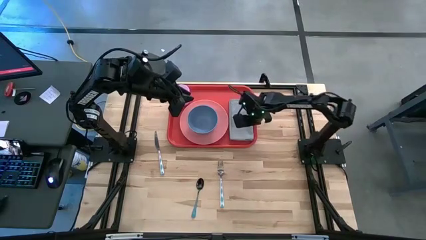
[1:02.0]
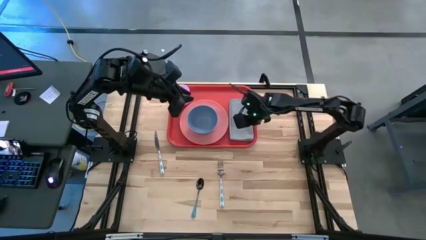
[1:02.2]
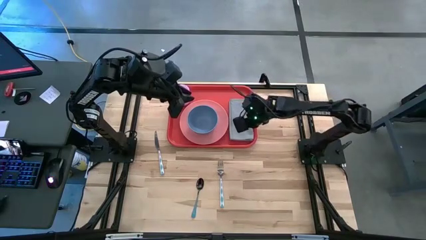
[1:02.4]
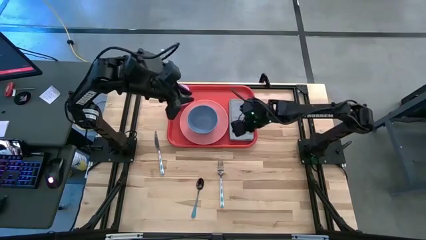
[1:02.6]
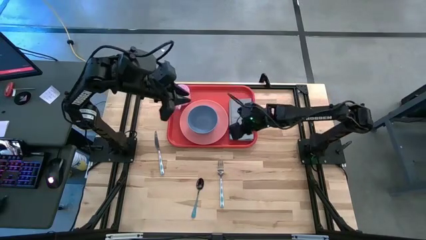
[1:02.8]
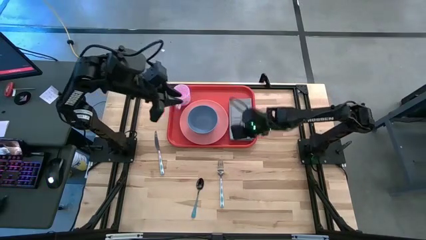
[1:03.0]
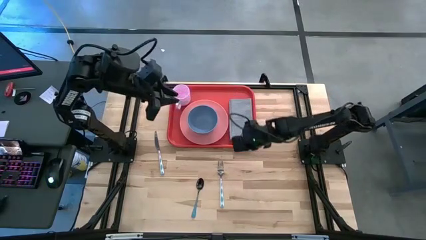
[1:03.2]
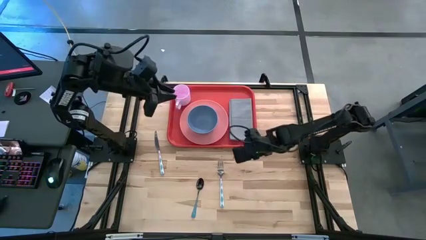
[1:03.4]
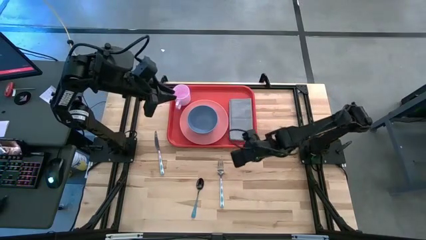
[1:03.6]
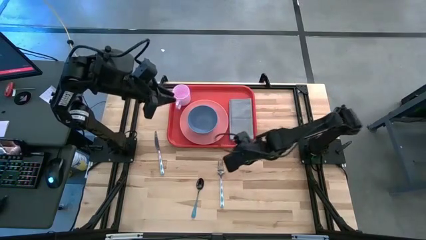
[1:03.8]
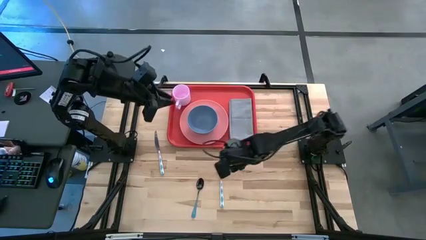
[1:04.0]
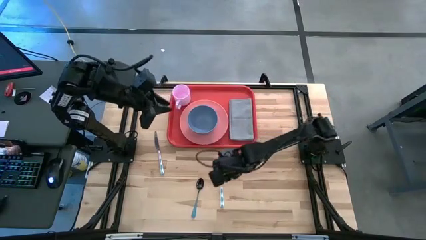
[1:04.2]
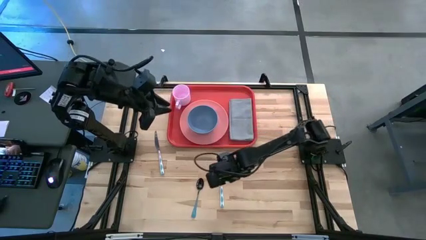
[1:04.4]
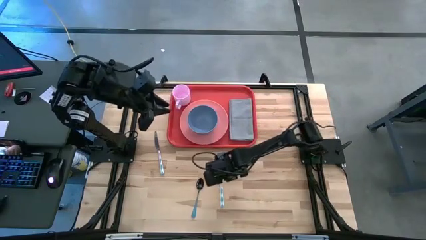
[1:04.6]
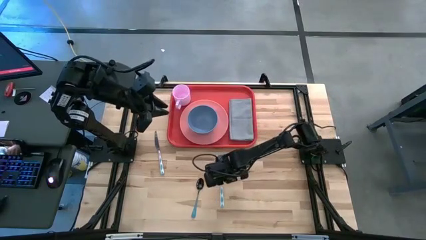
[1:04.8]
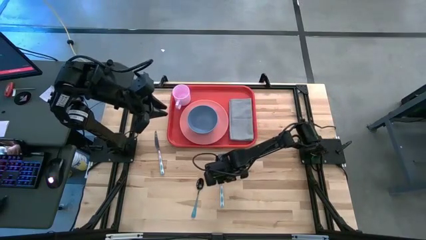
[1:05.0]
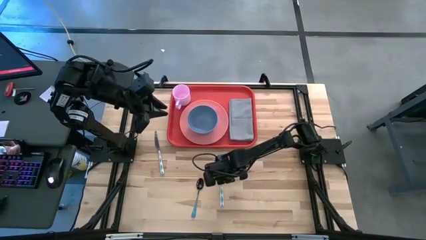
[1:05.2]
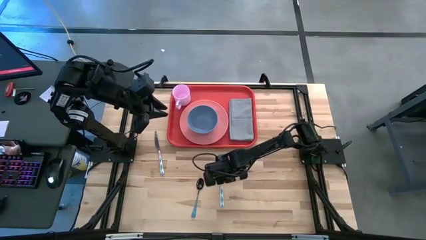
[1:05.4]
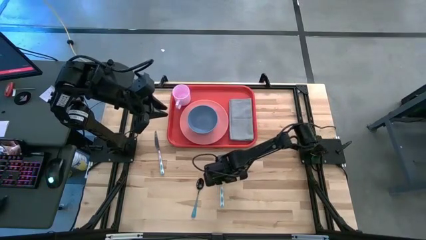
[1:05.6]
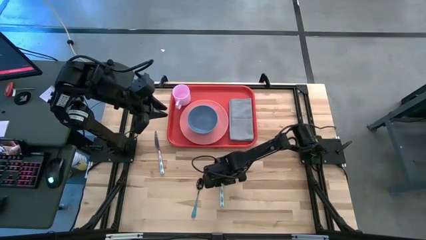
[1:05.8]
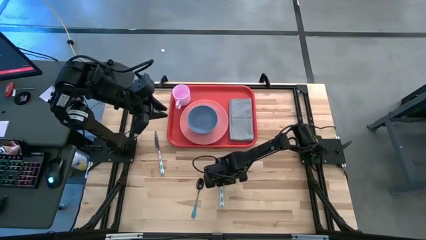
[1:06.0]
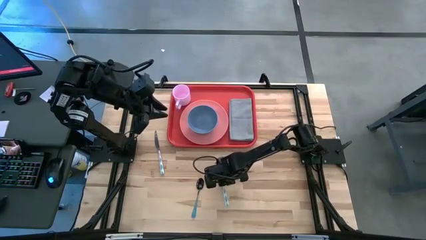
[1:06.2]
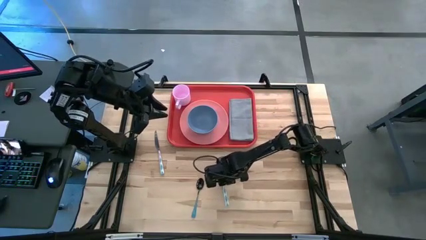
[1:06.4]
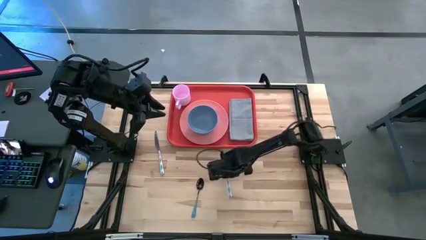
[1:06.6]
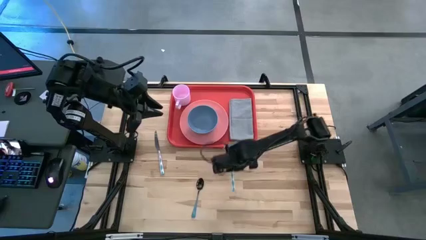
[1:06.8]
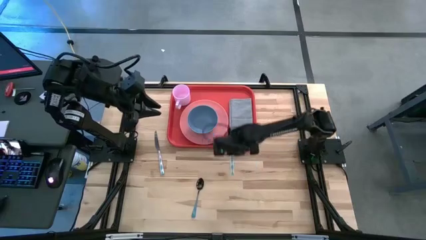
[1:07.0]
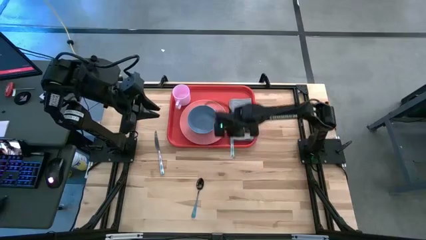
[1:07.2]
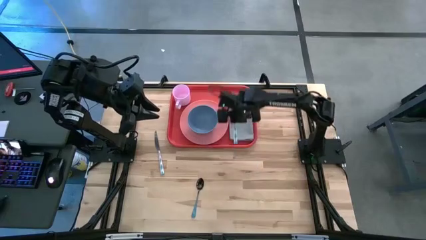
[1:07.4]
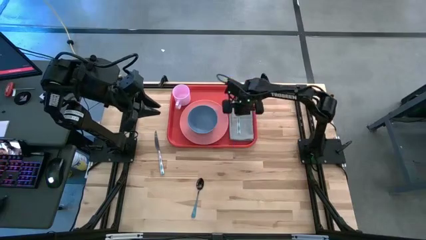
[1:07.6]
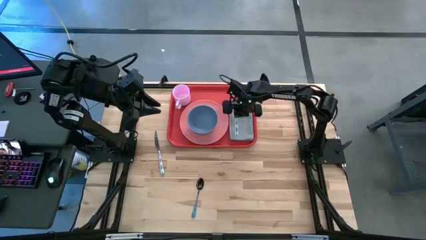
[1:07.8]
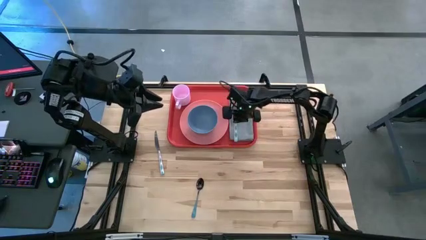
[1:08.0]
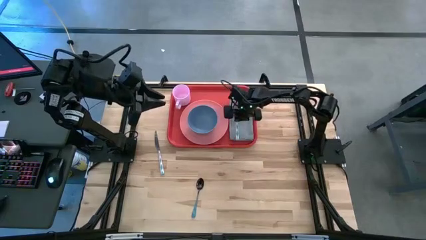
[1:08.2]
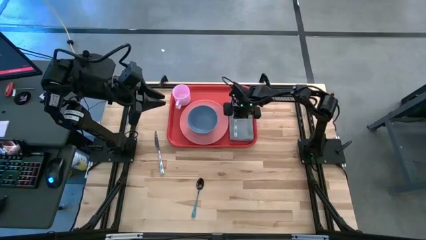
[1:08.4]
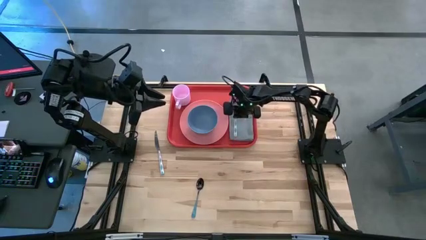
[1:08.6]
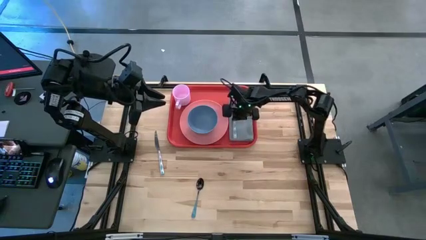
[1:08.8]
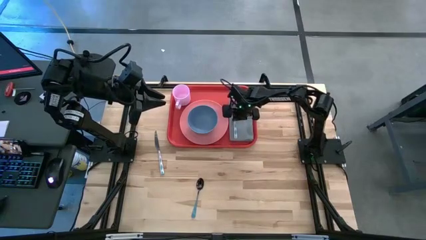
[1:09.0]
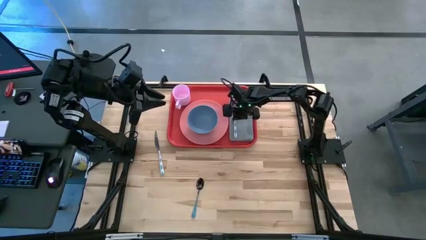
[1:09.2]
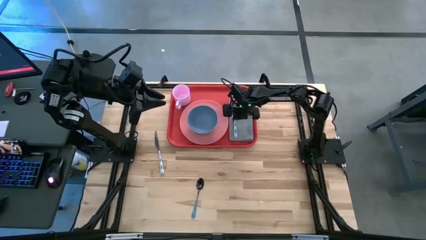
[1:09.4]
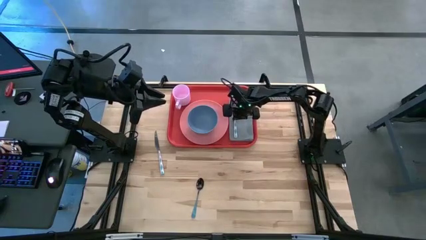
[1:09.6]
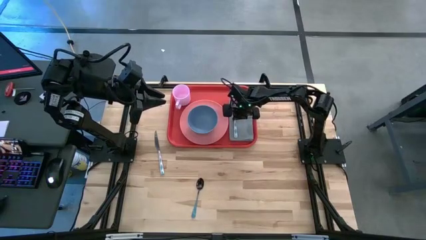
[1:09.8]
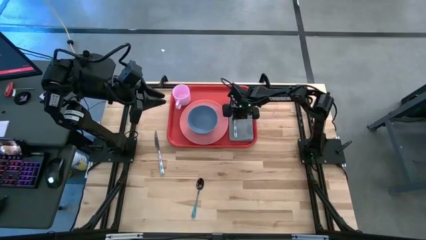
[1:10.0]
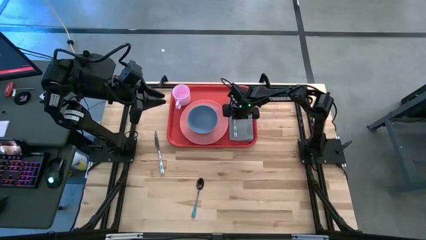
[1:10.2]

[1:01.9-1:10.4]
Task: Set up tray
Put the blue fork on the gray napkin

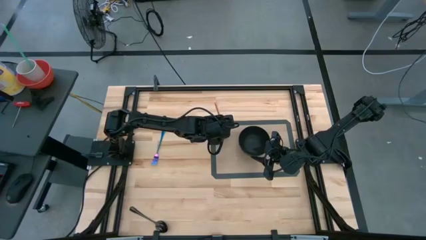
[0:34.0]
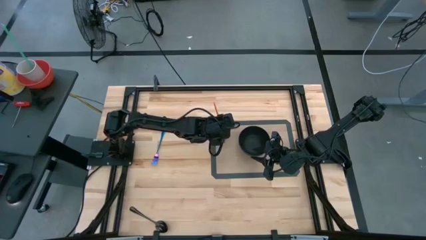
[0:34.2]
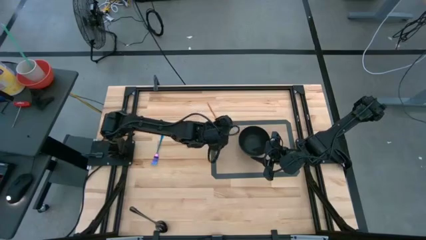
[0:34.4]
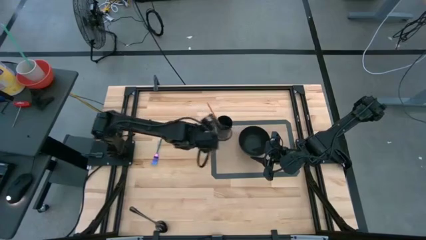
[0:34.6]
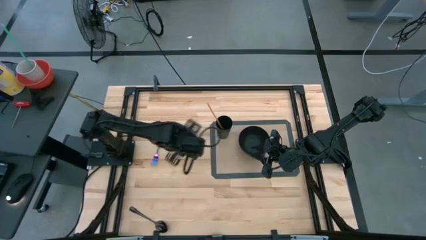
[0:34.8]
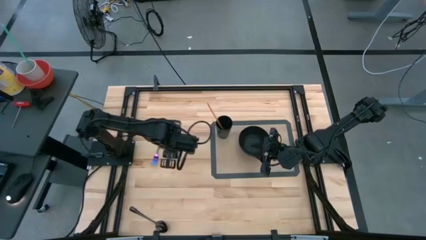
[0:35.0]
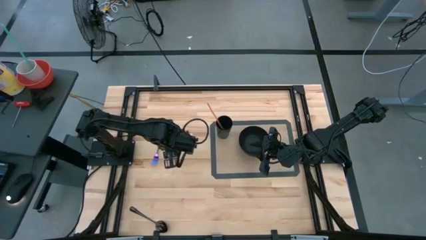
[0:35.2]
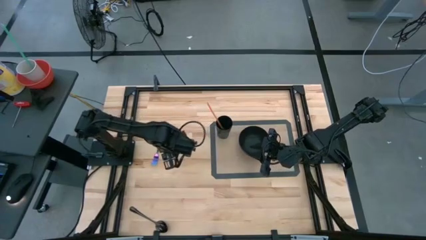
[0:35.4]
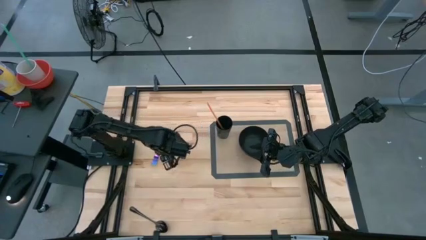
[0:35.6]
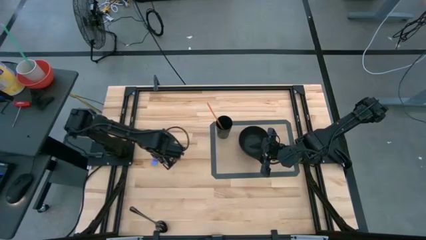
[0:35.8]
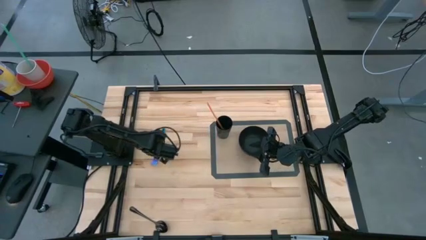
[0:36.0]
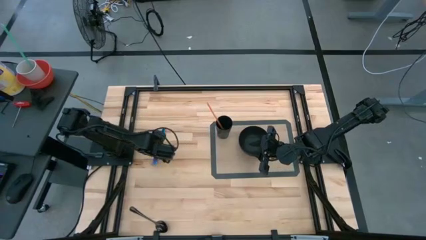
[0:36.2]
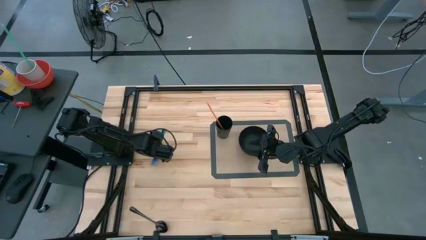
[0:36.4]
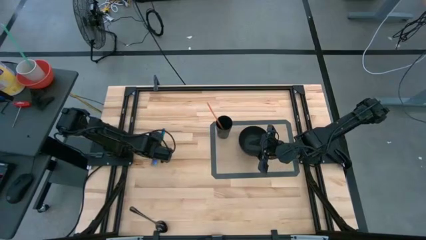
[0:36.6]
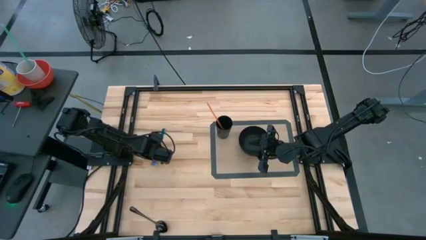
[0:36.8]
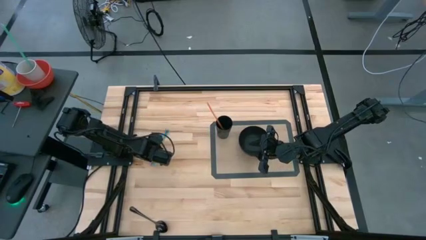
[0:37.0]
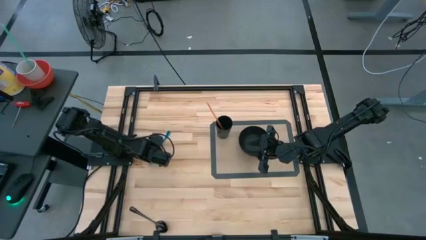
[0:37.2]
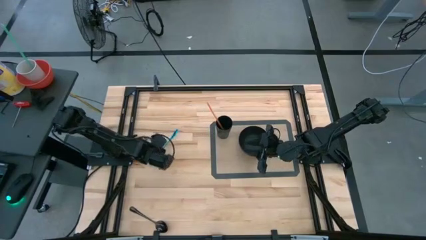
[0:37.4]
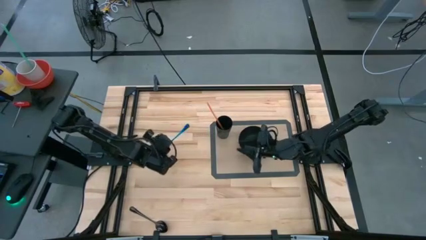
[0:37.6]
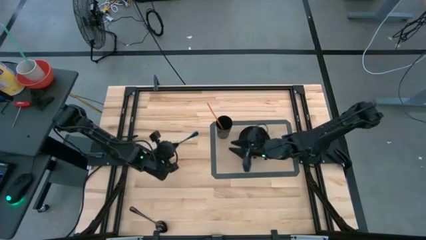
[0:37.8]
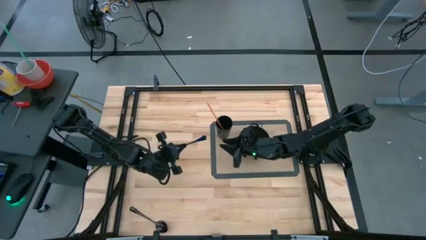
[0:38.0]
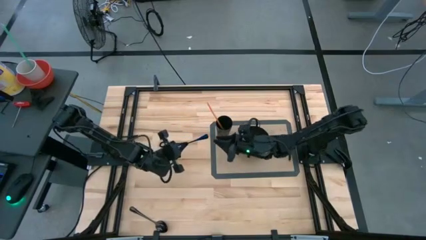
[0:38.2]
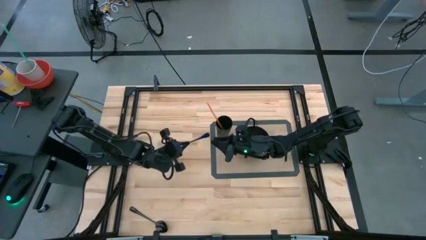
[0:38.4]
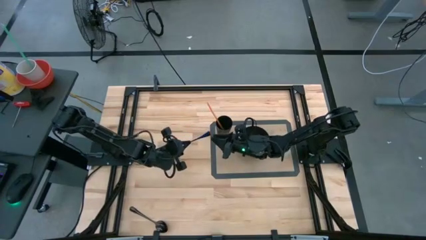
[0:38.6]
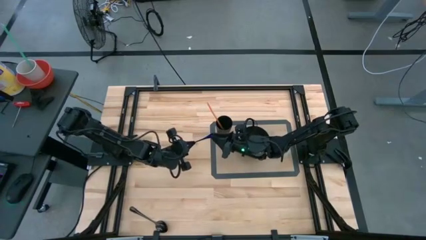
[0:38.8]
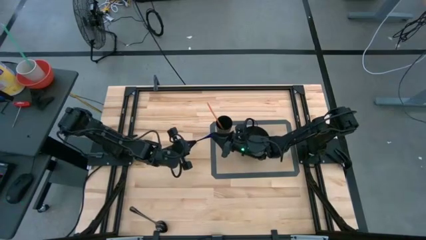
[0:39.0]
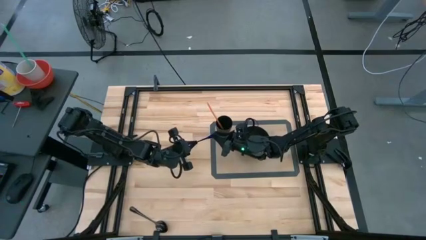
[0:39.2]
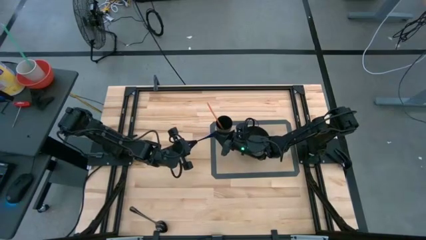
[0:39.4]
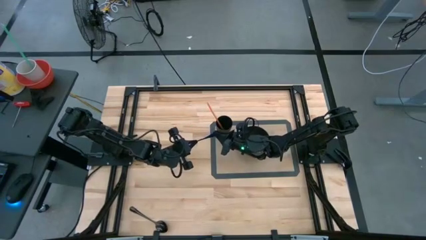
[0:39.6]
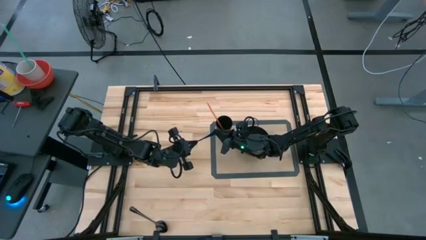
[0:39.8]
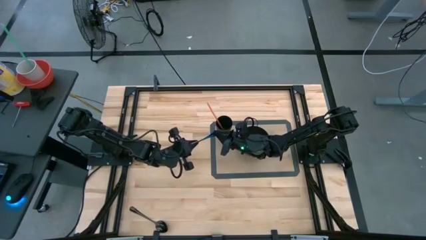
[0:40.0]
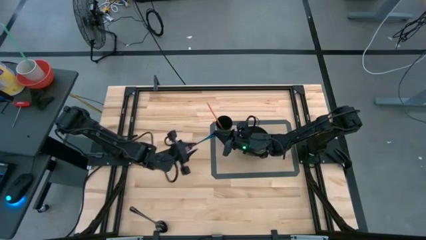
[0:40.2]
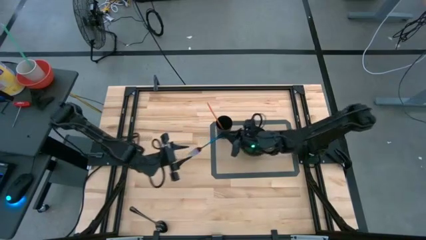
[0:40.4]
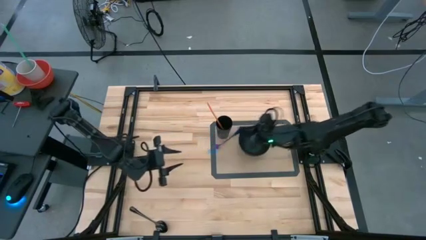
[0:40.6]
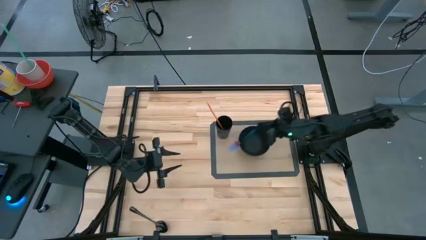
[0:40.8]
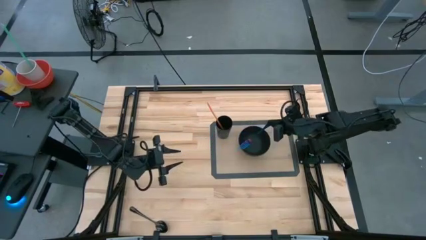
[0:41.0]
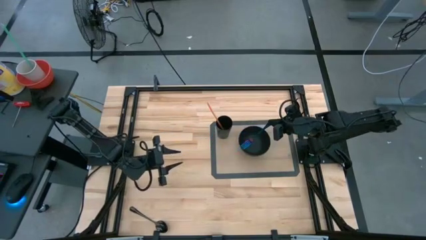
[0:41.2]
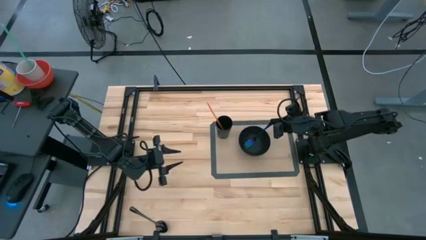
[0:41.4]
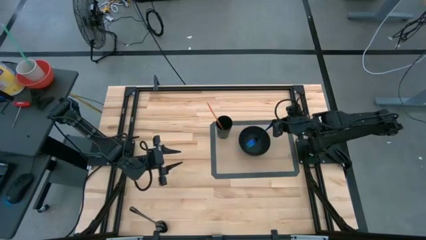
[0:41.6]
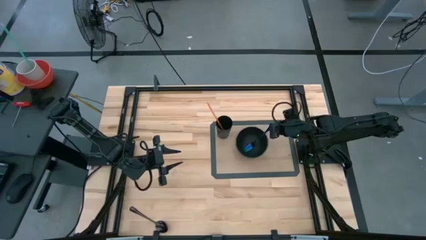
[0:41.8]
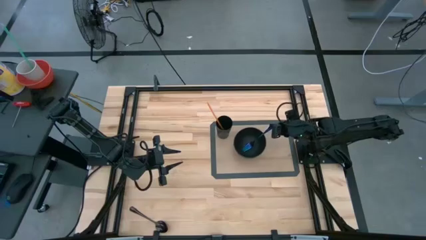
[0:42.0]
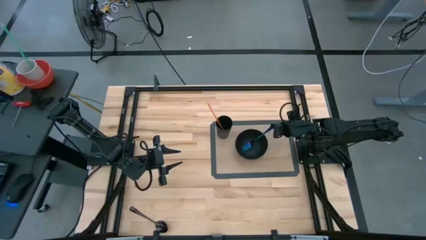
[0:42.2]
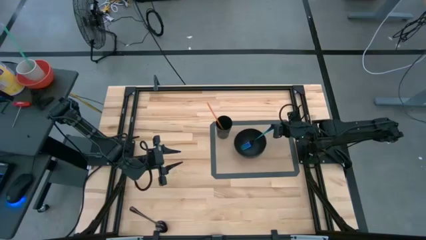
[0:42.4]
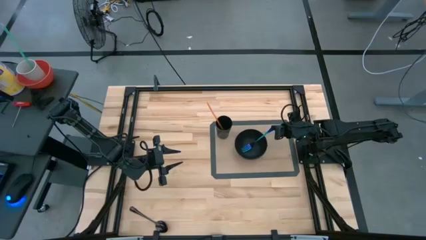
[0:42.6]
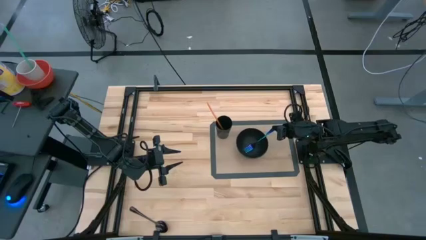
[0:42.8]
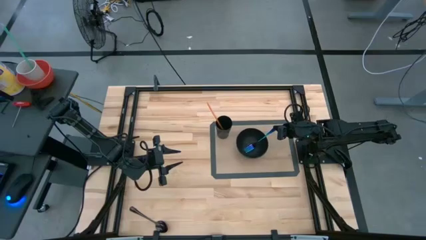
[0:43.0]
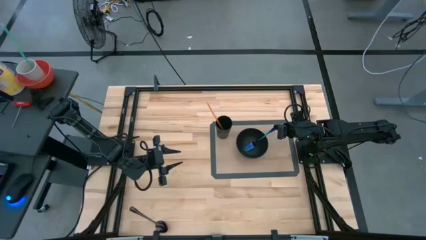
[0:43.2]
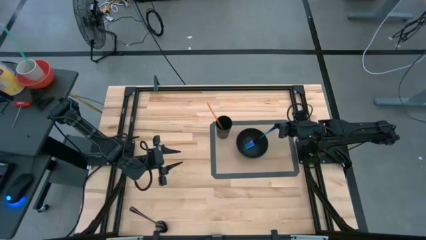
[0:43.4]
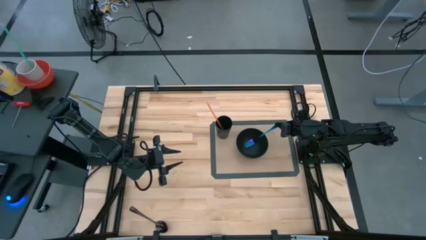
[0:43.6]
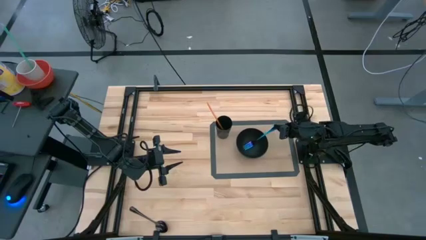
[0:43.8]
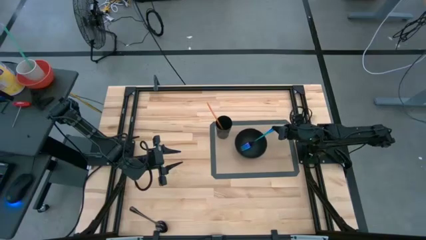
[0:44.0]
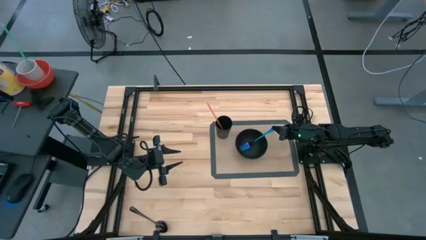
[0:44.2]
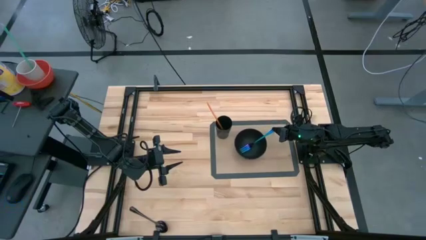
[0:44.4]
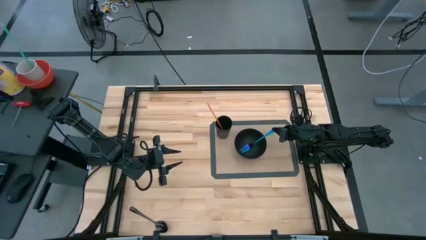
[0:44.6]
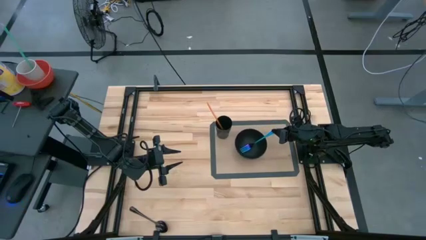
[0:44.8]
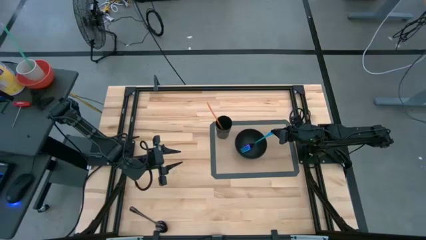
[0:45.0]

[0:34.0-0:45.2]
Task: Pick & Place Utensil
Put the blue fork into the black bowl
